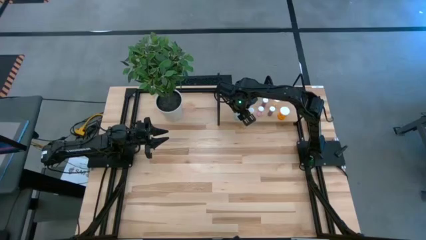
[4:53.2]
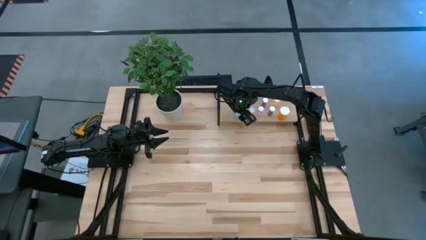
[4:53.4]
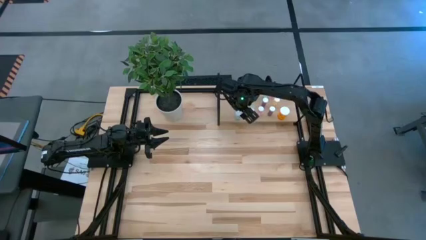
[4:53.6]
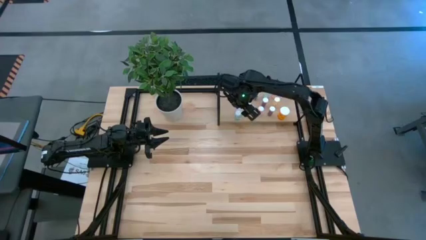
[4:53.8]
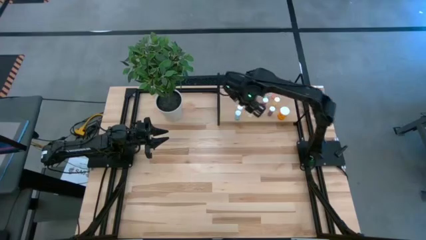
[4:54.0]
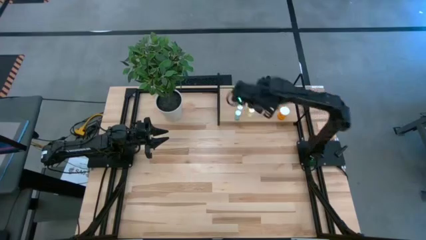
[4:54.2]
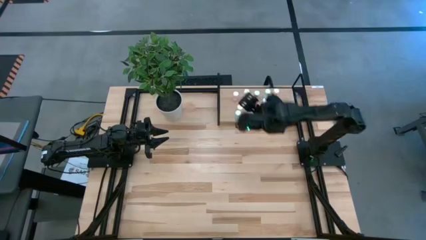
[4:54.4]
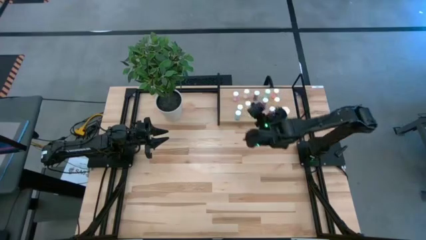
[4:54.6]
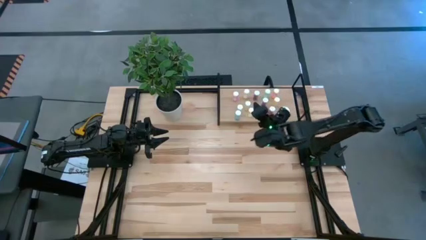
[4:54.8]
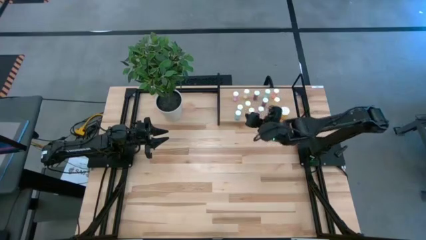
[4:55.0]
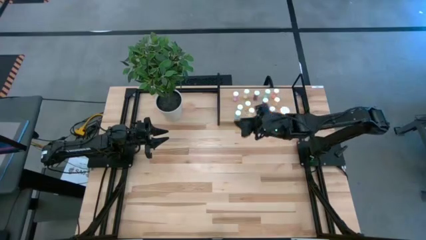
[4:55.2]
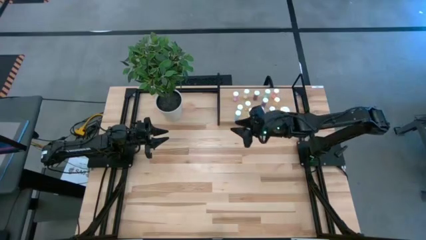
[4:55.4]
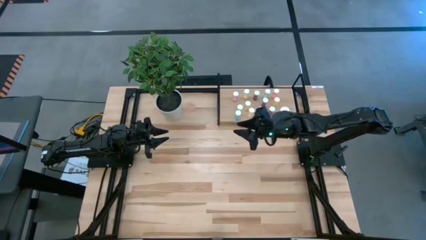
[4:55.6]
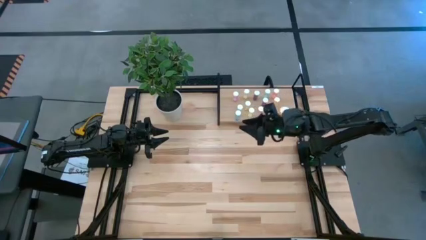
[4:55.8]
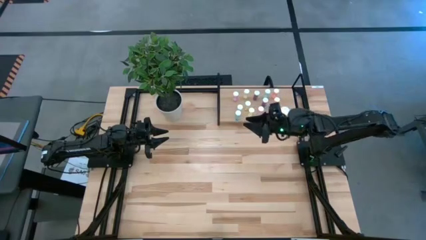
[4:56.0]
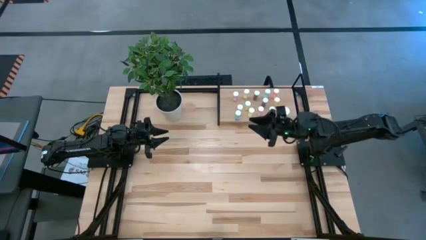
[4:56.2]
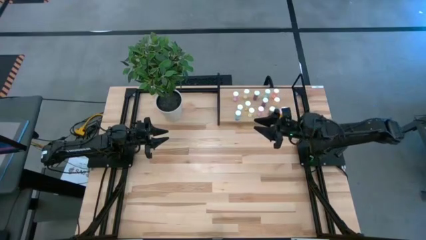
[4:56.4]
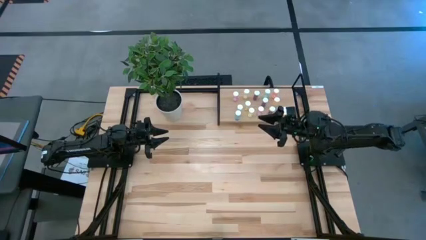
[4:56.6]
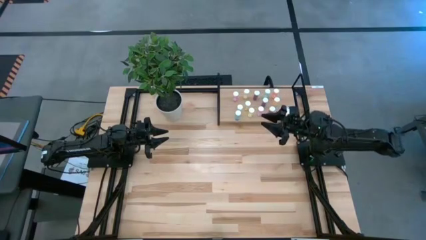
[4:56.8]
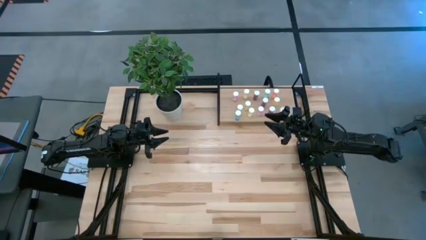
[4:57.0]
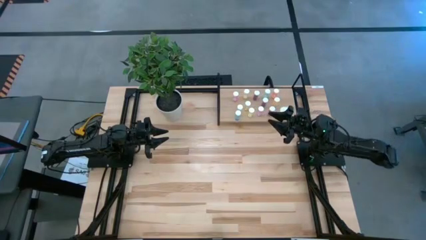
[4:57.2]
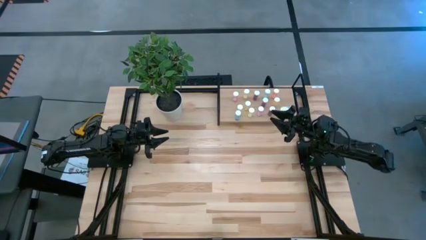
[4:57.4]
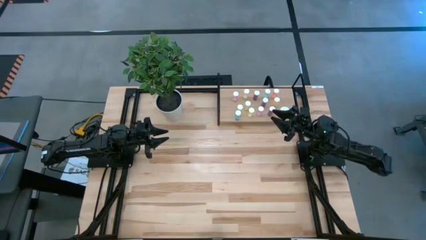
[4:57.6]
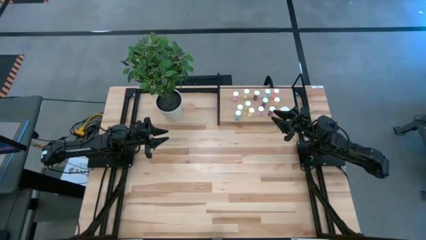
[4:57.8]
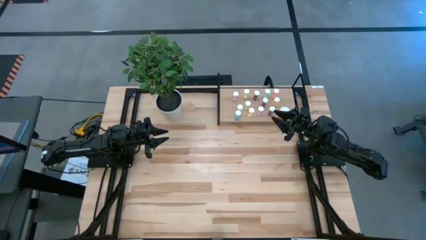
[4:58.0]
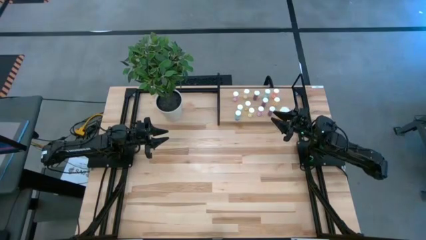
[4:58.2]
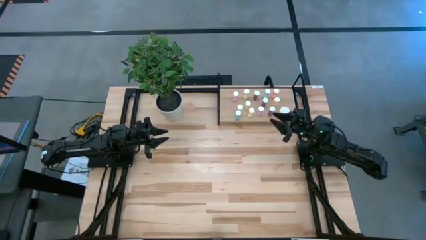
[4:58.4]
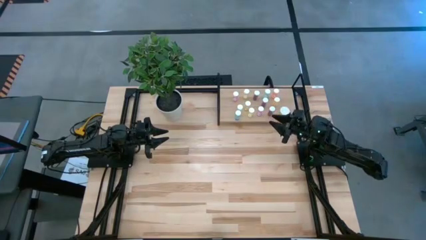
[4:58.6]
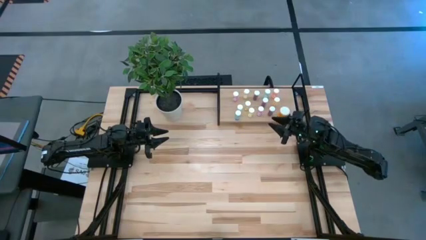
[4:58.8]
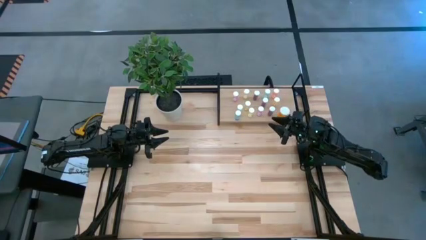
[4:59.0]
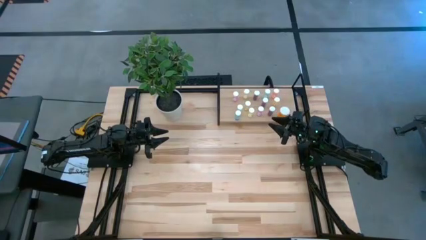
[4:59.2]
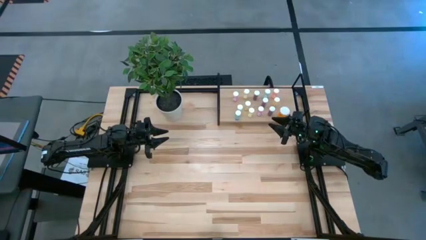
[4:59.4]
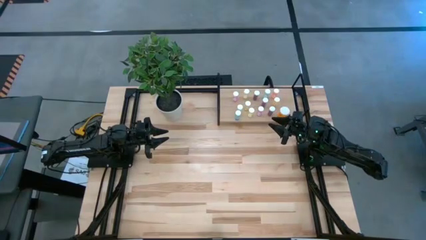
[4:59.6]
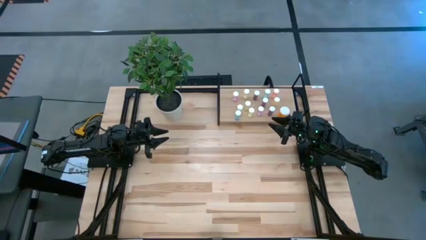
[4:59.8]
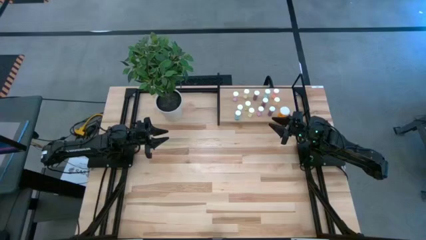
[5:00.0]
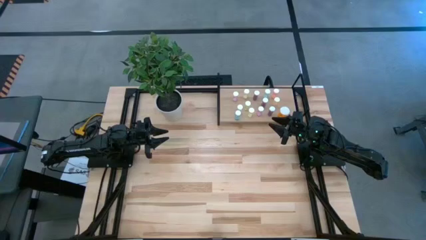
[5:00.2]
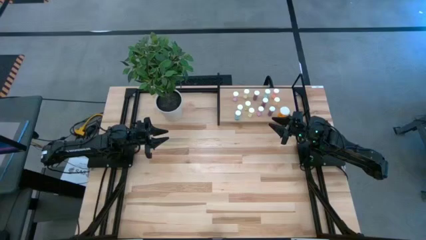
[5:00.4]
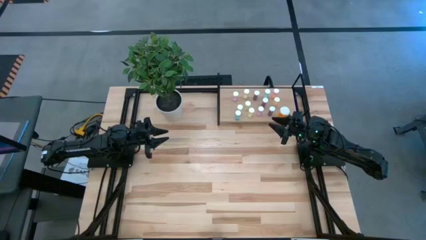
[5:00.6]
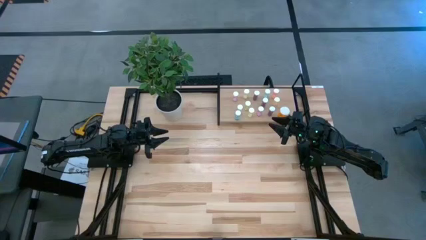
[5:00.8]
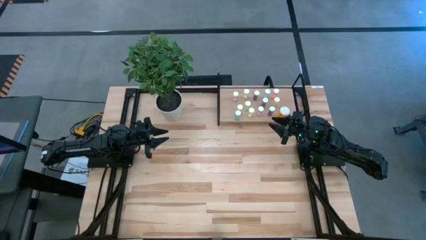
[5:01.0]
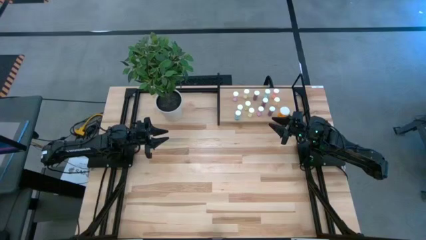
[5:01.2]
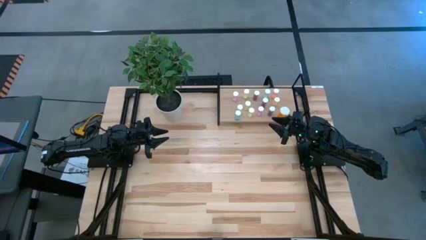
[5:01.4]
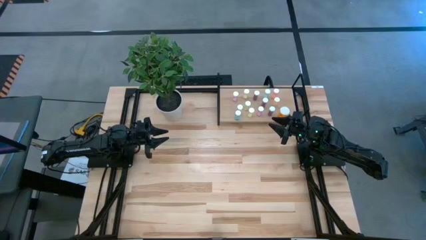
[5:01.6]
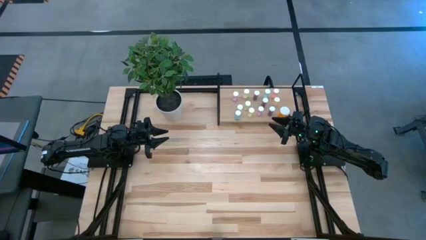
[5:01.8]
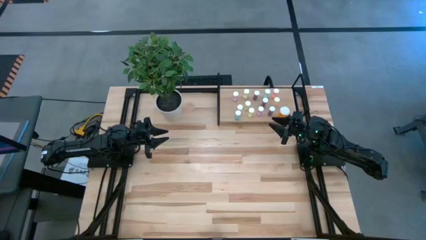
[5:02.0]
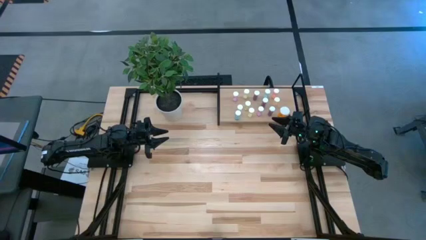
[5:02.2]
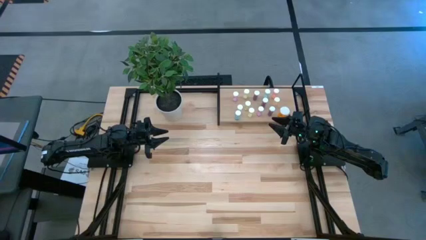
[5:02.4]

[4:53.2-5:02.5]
Task: Pick and place medicine bottles onto shelf by color
Return to Home Position

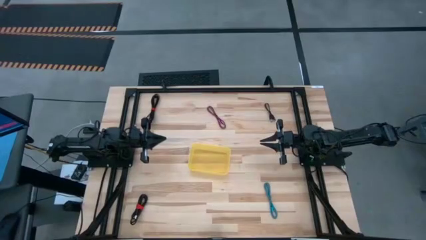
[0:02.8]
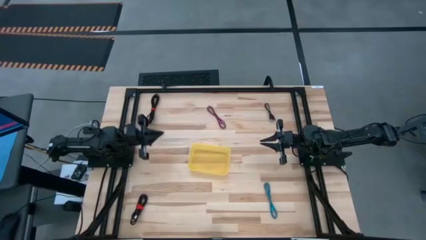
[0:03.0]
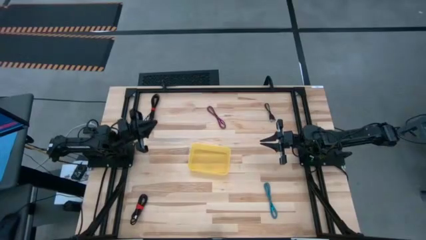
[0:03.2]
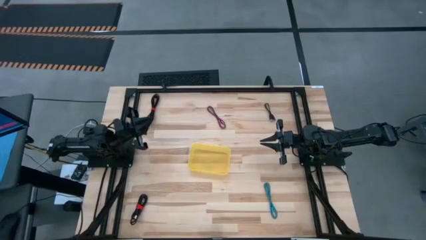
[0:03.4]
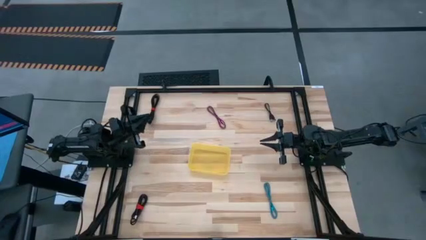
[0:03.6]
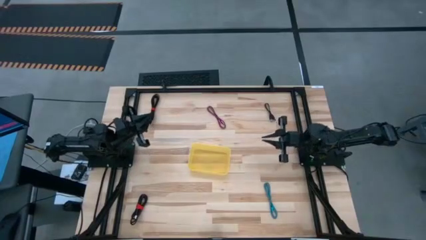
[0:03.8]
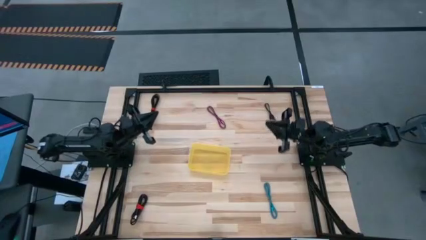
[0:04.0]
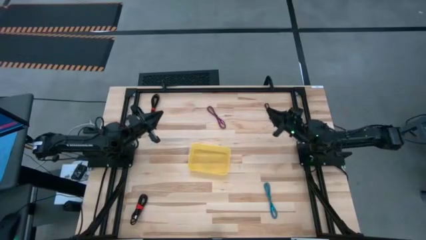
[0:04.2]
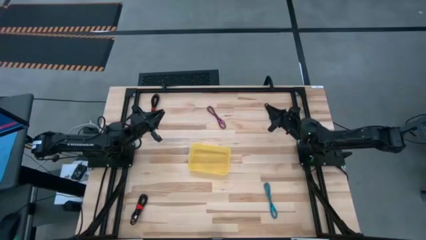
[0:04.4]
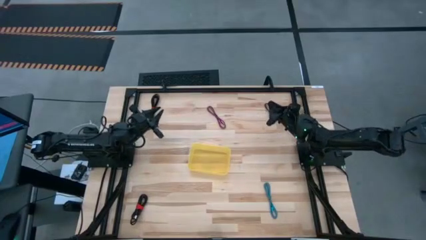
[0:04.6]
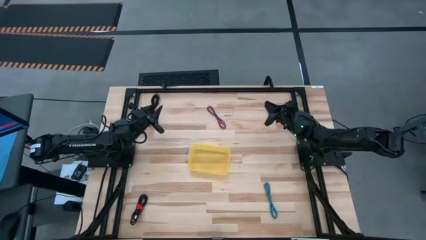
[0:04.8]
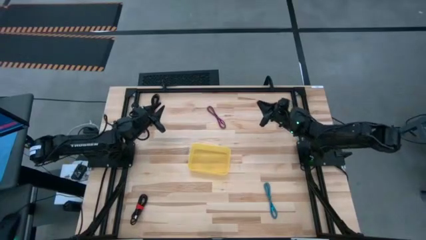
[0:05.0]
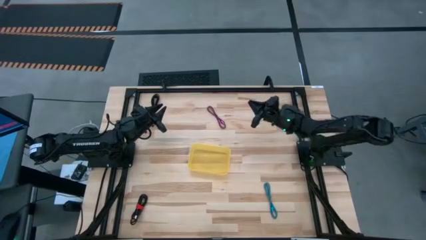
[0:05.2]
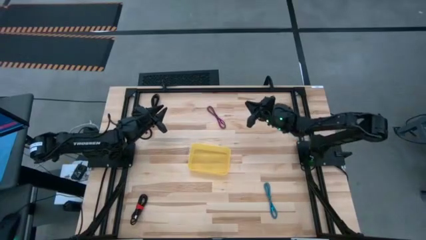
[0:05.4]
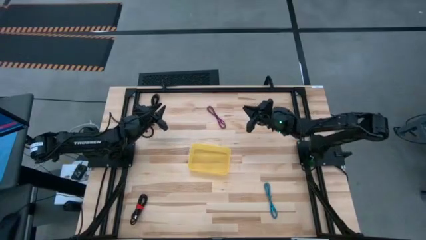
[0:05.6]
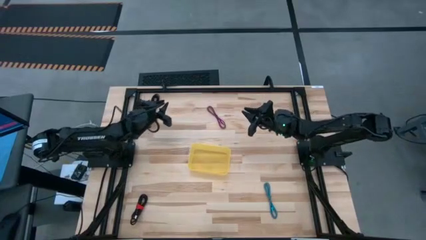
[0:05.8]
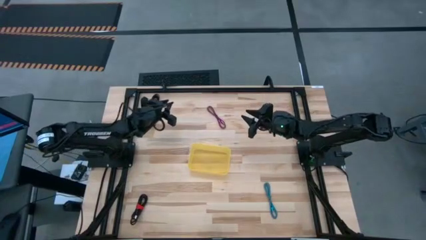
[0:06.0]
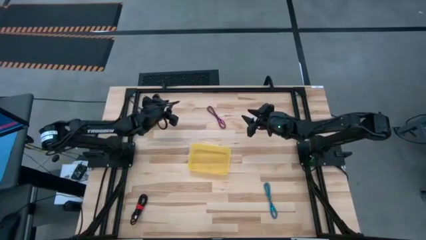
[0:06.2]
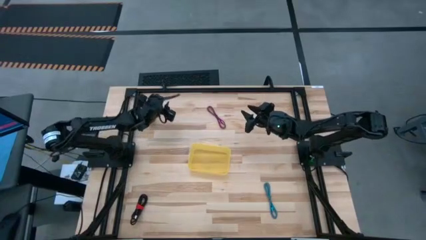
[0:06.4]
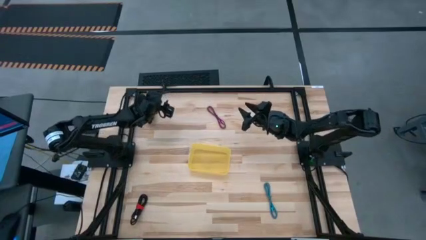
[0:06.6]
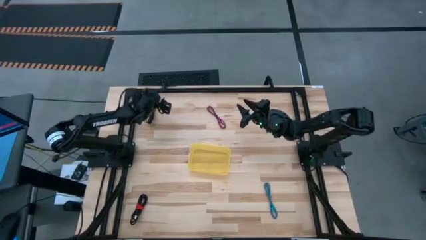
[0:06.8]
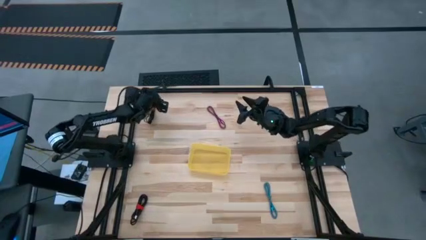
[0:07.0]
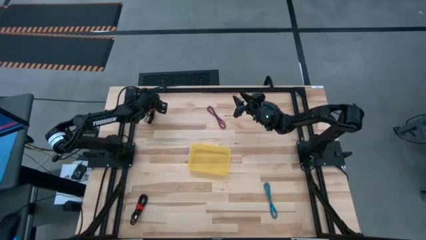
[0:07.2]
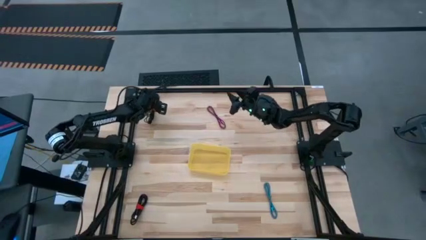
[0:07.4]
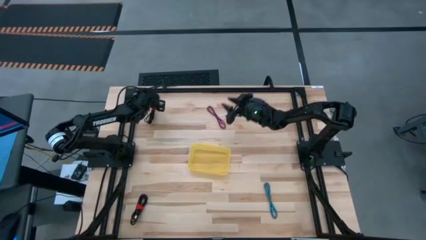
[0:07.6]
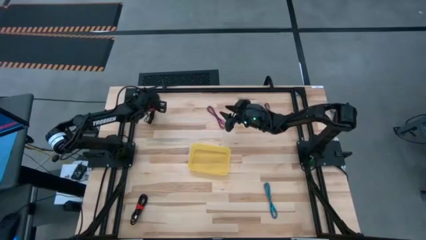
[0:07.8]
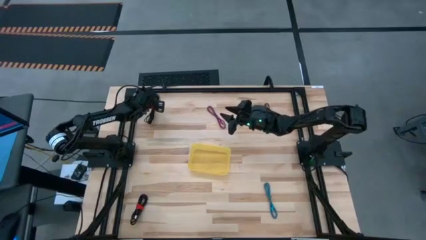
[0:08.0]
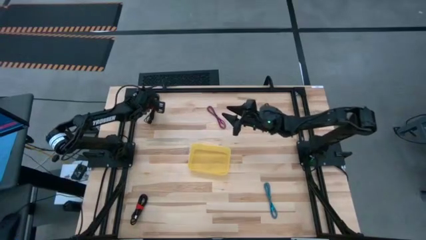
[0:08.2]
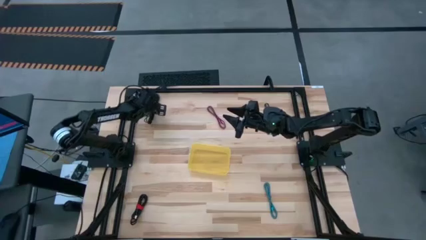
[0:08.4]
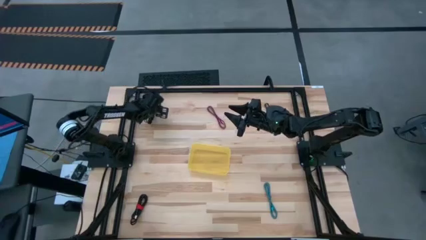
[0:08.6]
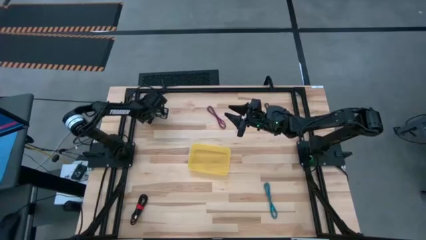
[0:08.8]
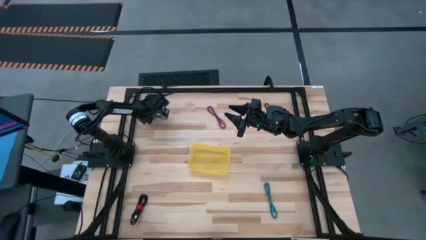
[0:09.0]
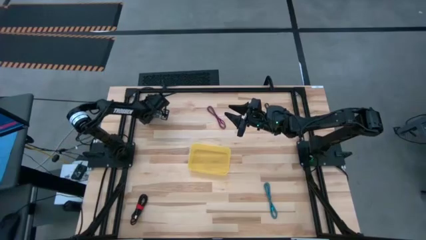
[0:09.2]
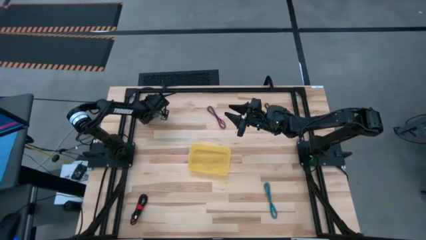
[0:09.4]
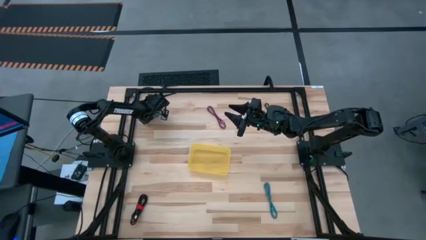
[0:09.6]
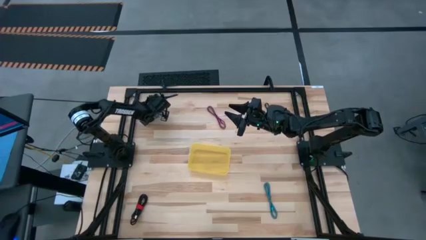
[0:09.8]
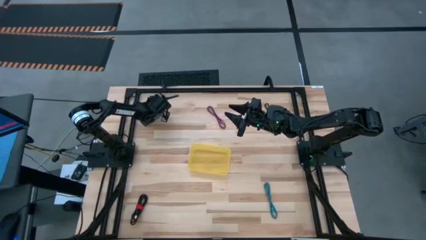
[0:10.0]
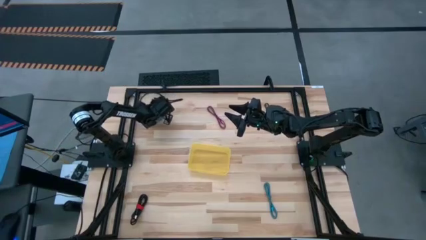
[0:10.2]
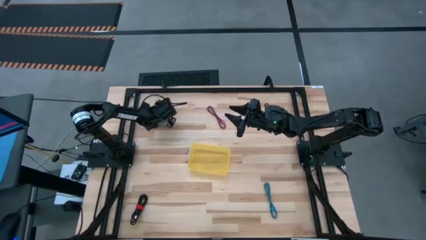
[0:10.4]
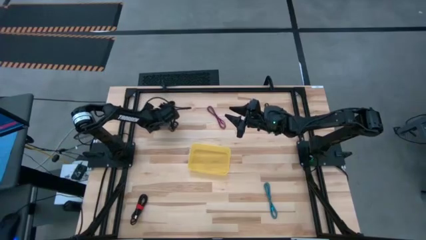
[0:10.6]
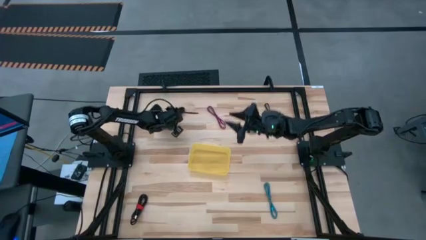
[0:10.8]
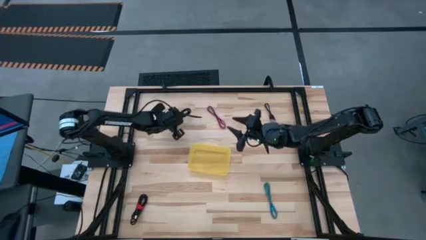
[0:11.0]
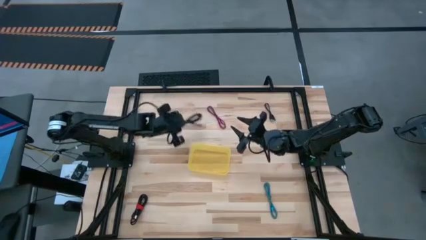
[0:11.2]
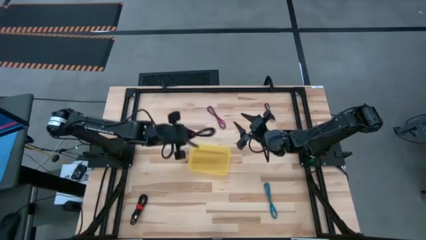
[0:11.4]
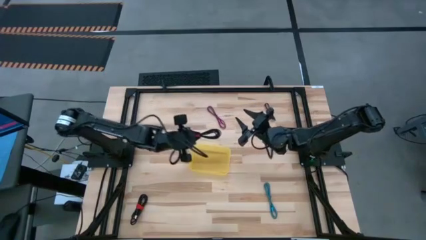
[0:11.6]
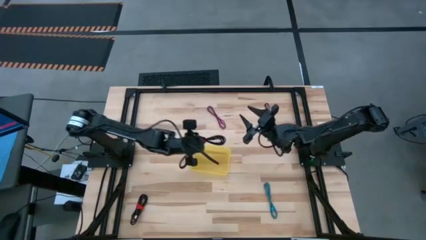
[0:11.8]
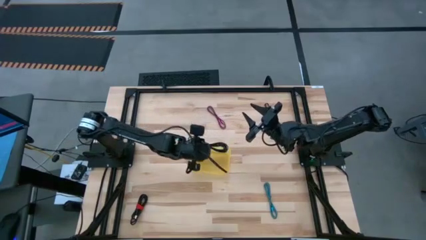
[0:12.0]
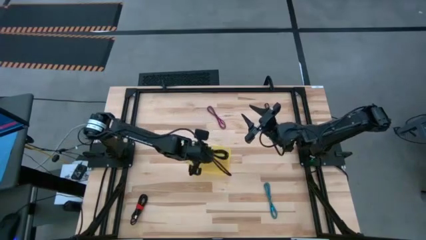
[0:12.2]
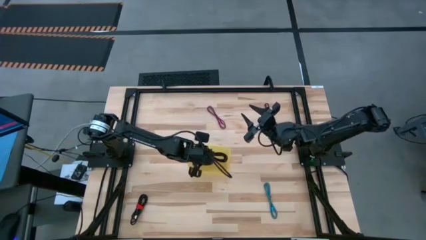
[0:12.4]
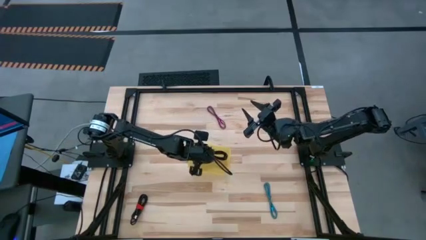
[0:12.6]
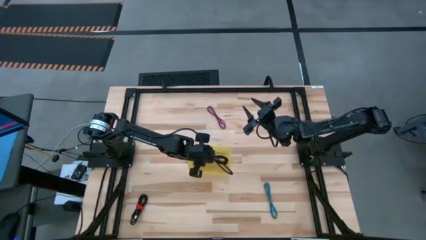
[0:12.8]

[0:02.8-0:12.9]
Task: Pick and place USB-C Cables
Put the top left black charger cable into the yellow bin
